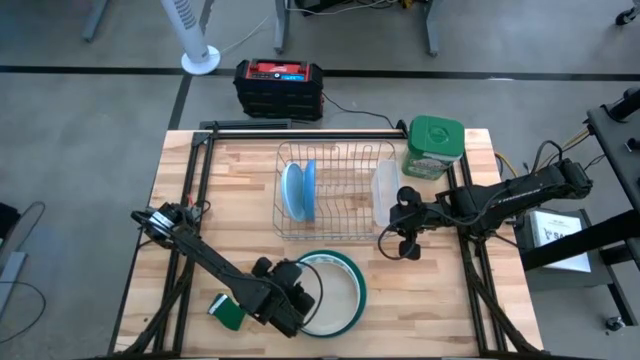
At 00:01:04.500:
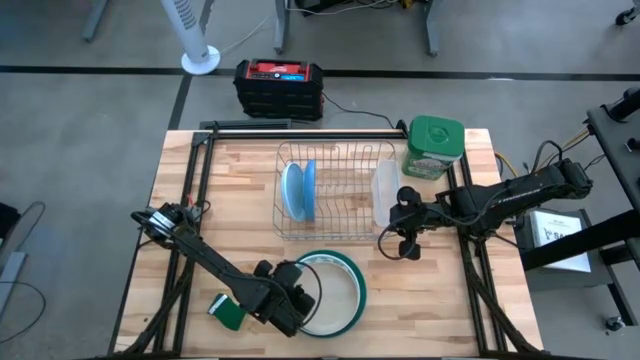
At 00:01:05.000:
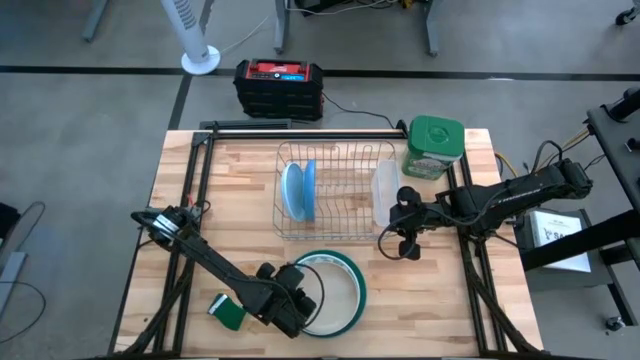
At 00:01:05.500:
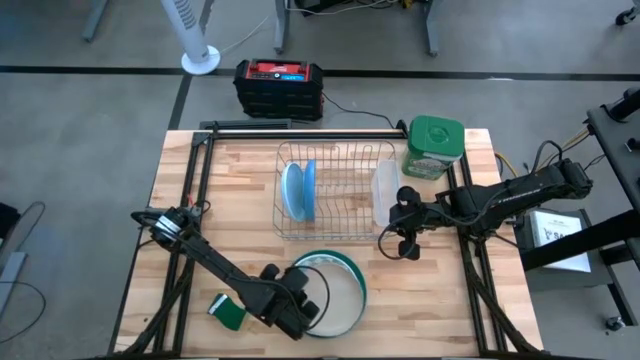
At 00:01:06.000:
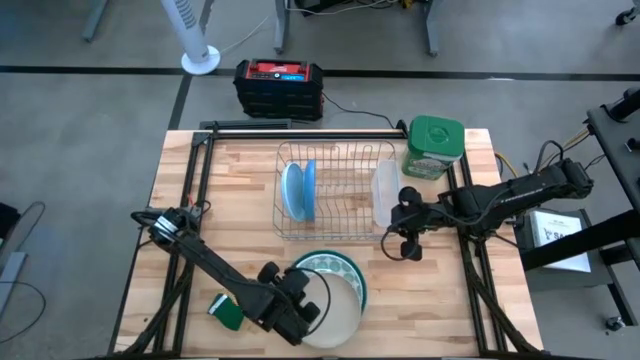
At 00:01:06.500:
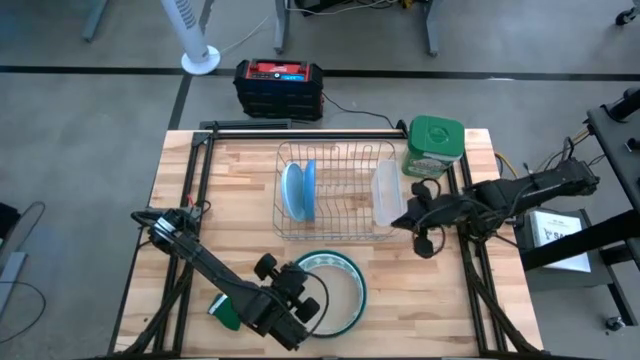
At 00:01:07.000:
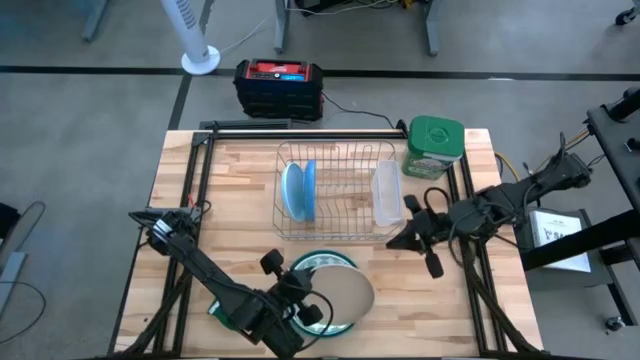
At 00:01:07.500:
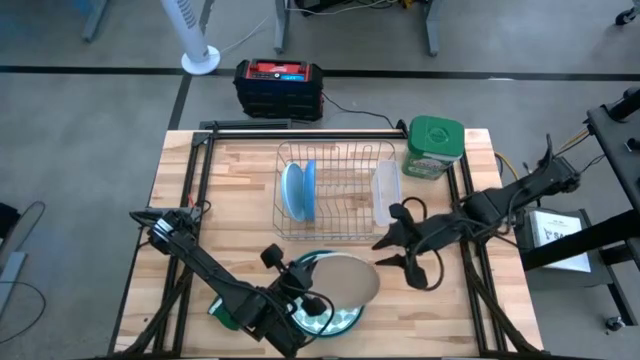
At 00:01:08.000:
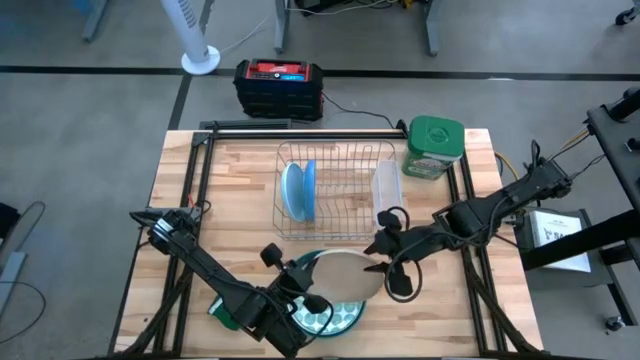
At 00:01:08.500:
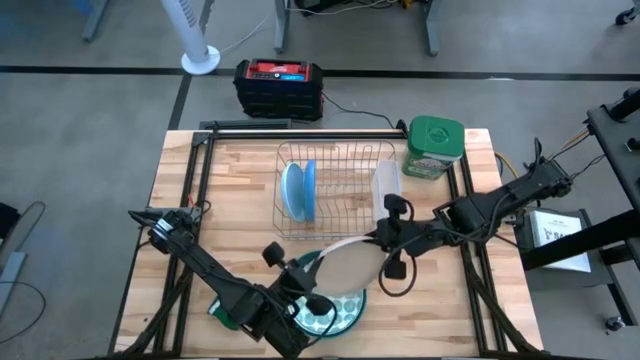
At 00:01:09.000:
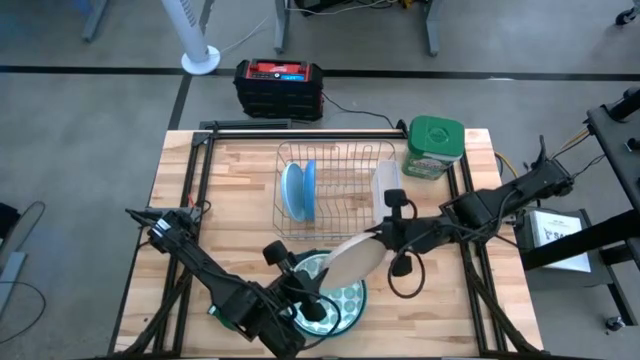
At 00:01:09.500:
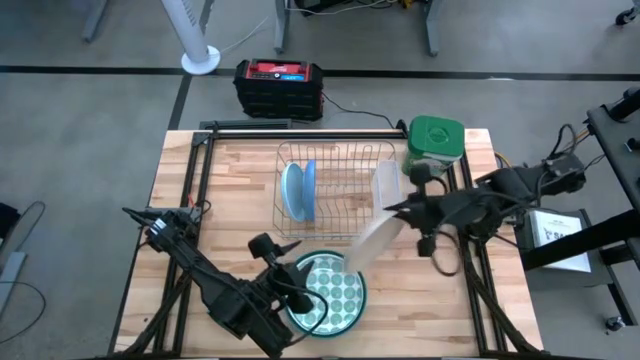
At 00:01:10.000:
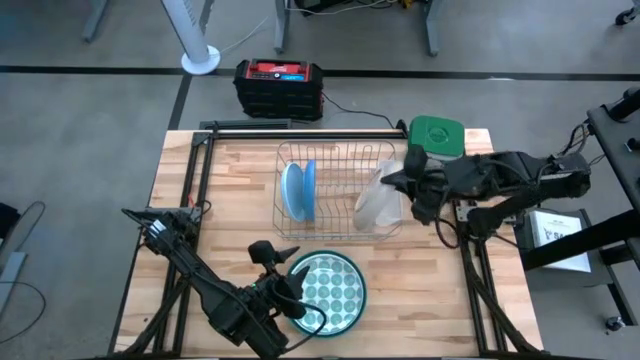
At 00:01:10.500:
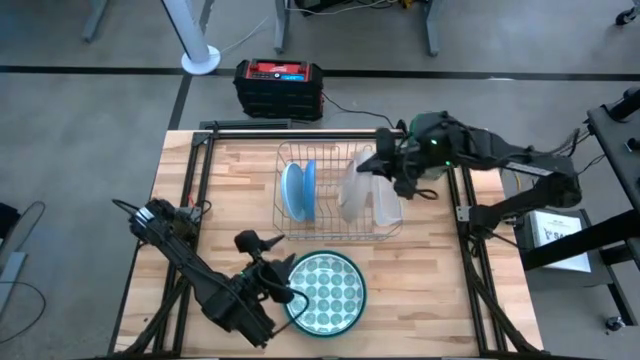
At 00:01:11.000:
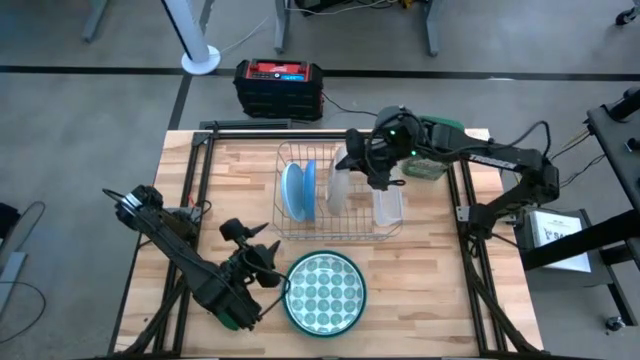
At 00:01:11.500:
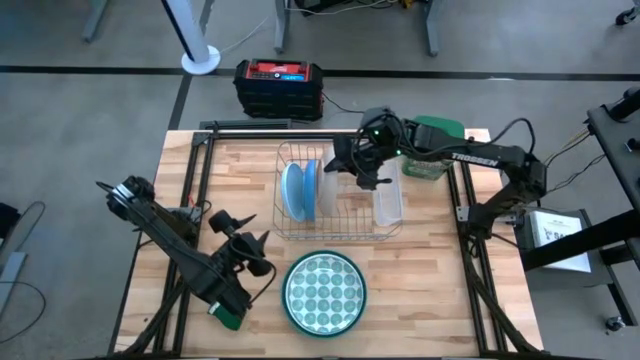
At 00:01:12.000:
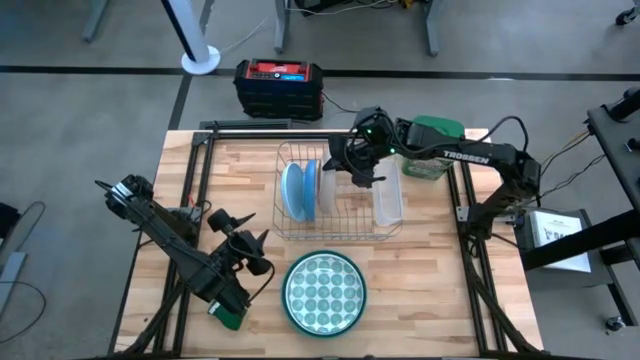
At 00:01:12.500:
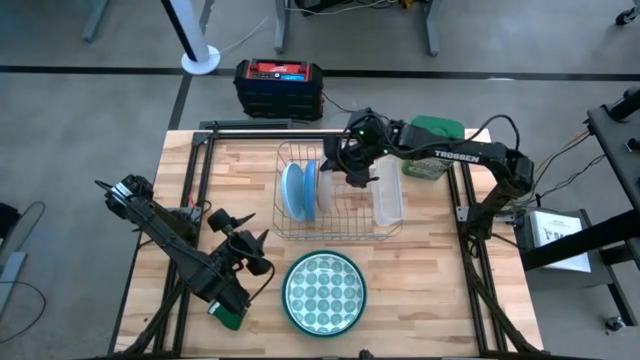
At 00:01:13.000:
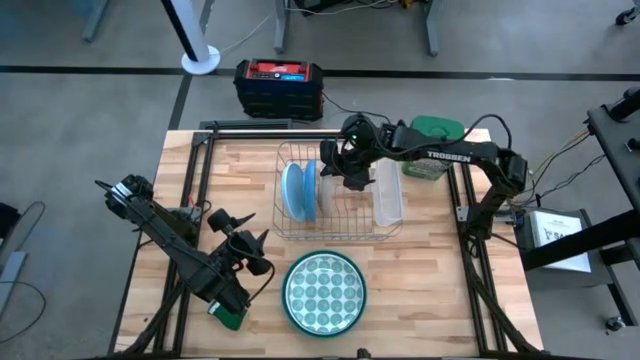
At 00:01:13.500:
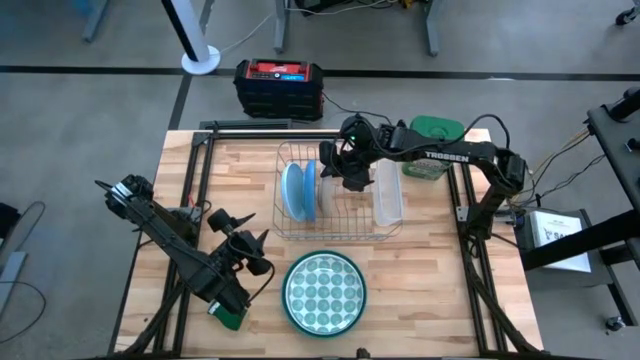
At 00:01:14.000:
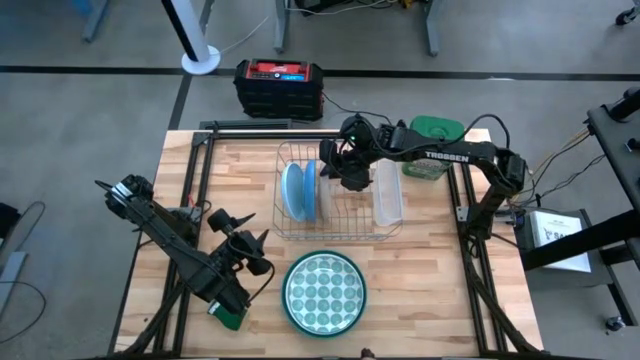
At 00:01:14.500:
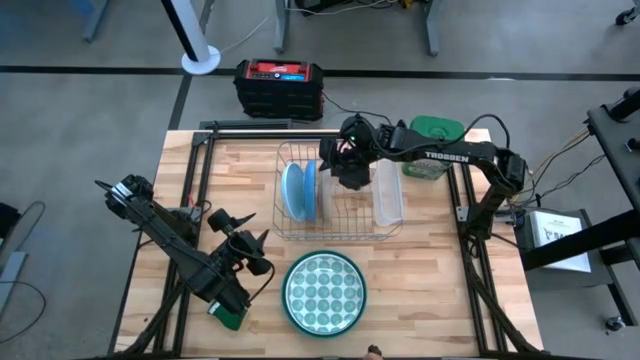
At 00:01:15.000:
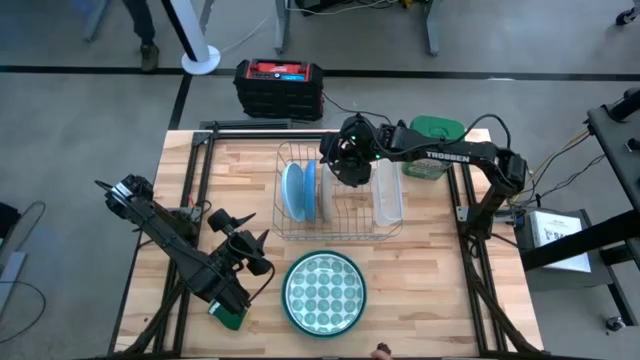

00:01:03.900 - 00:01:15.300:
Task: Sort dishes
Put the light orange plate in the dish rack

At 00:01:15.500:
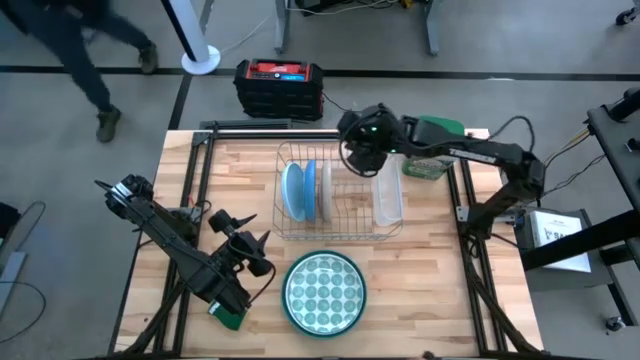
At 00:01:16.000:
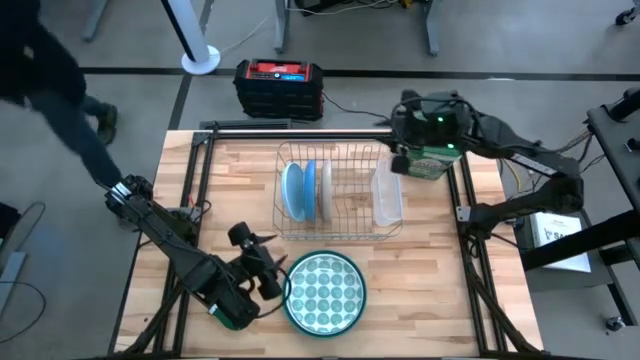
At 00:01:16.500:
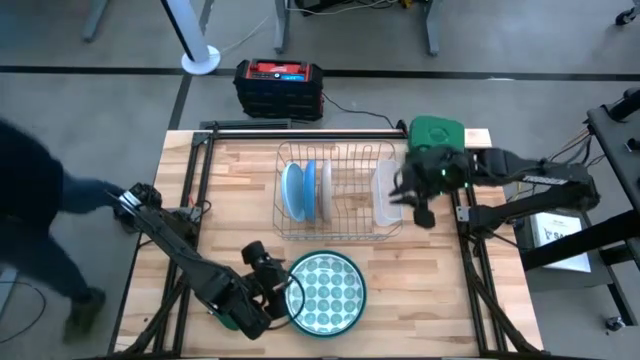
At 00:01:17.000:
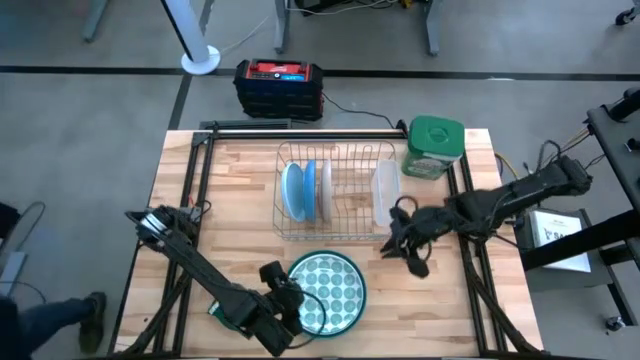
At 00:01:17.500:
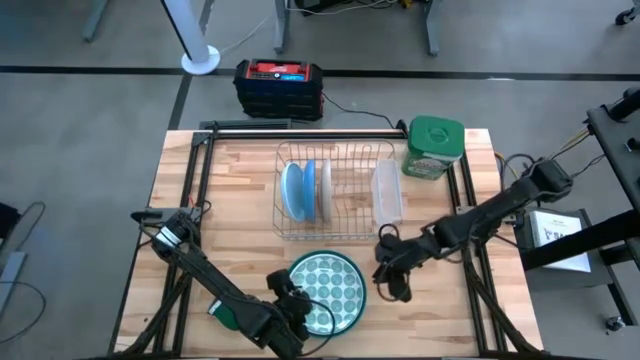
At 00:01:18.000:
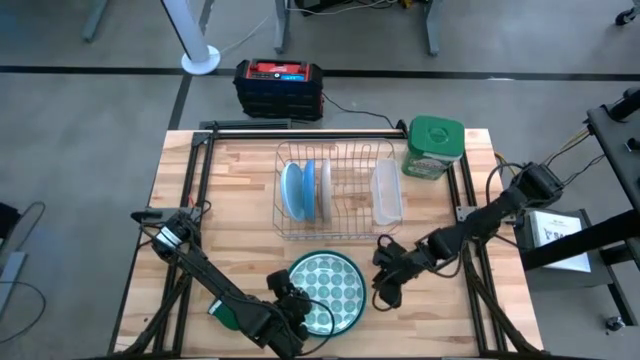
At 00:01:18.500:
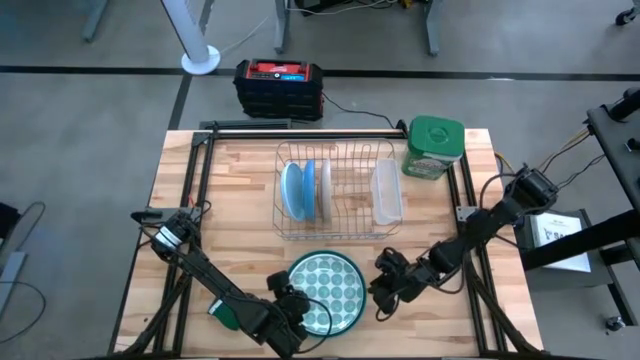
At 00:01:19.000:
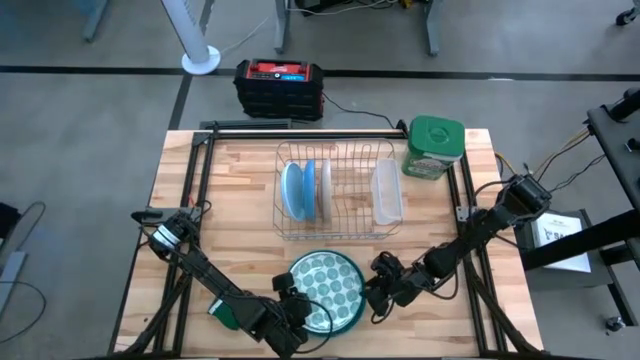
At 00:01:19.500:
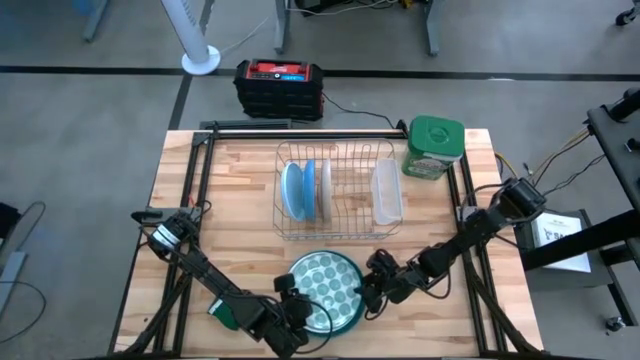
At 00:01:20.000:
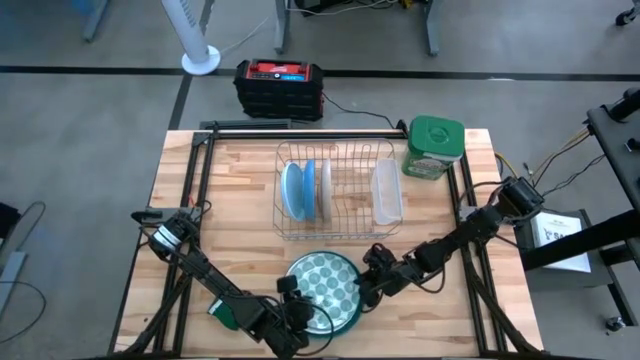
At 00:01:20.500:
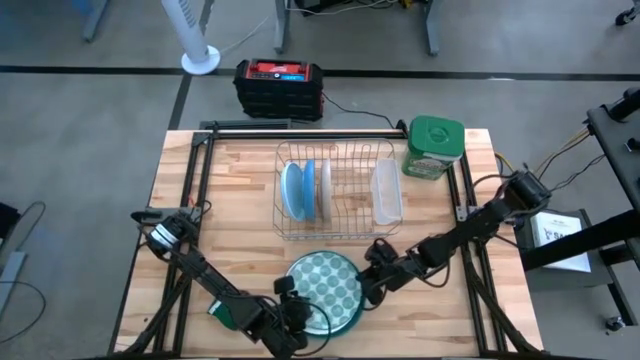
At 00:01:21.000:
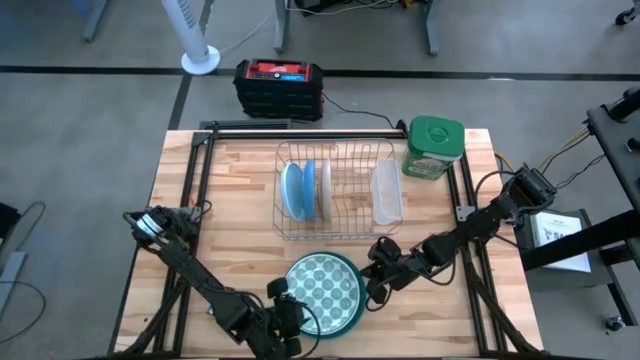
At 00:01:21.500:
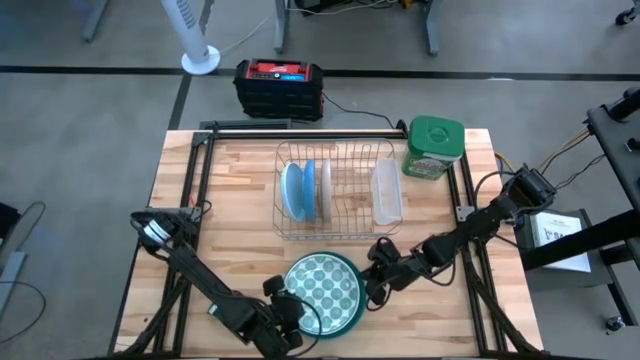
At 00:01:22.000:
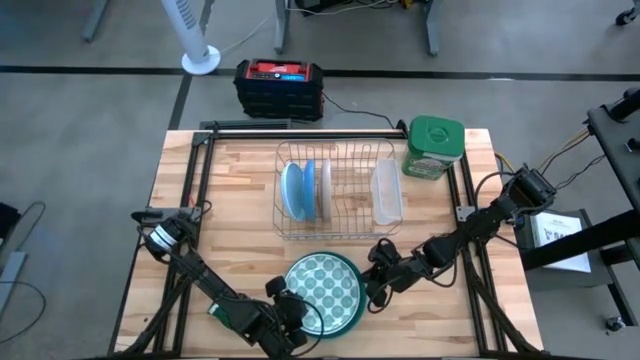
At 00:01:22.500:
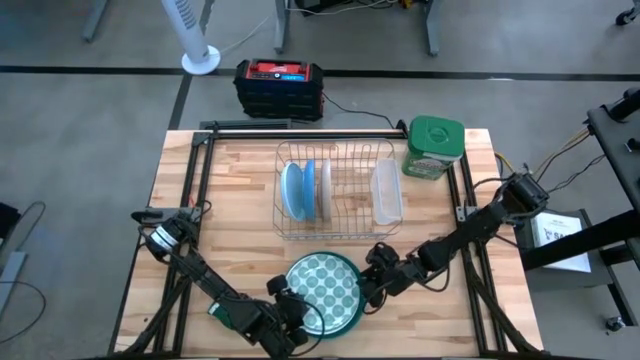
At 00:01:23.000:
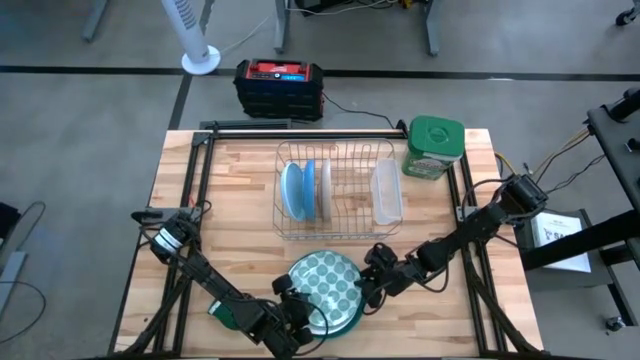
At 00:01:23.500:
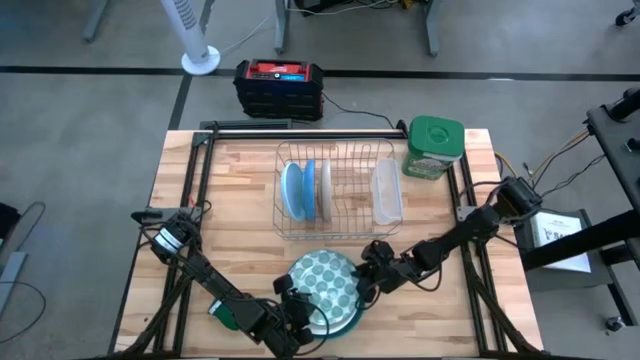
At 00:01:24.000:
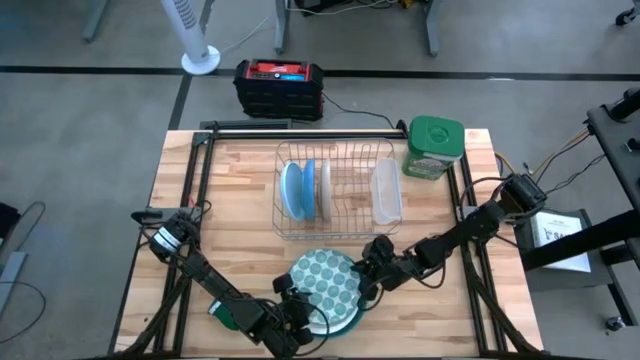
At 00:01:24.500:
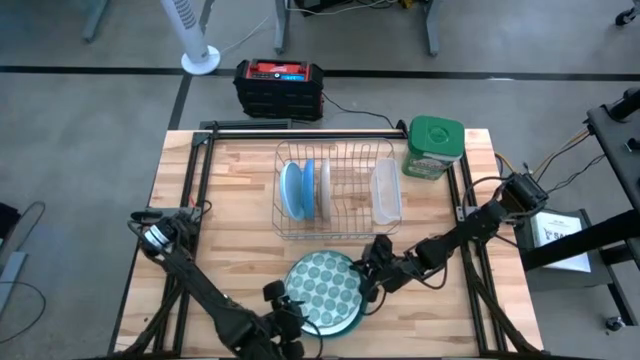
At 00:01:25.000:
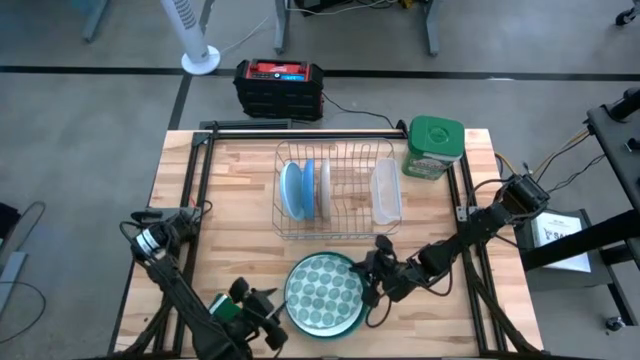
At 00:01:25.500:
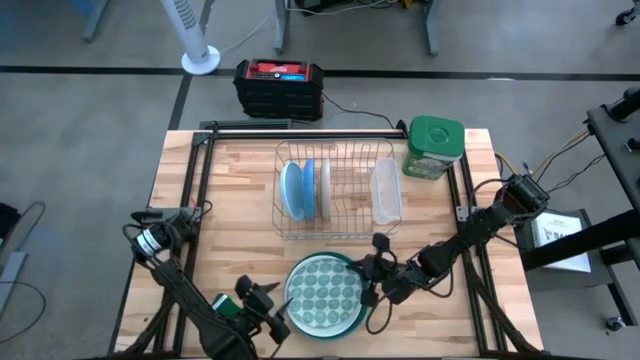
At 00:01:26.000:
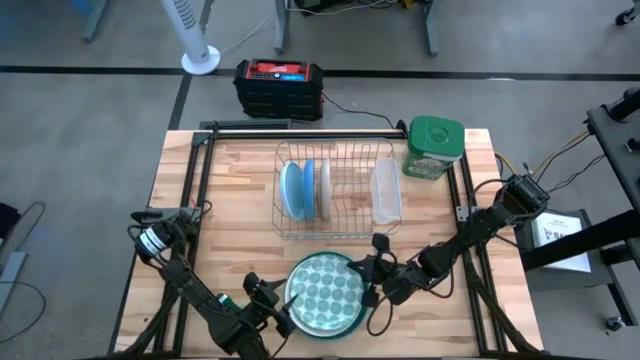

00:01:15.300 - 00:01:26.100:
Put the green patterned plate in the dish rack
